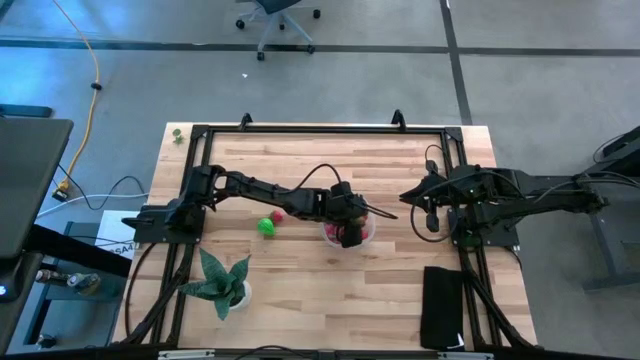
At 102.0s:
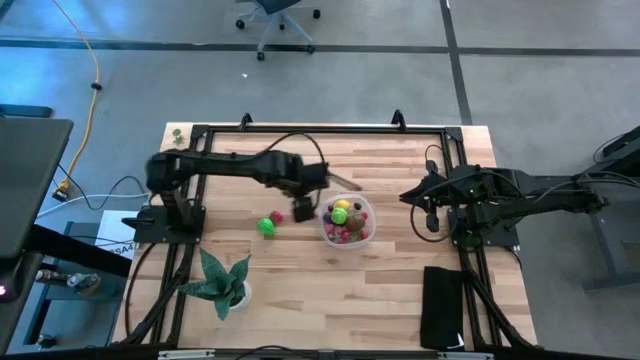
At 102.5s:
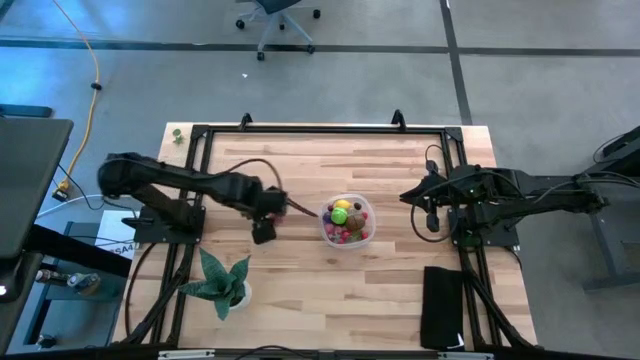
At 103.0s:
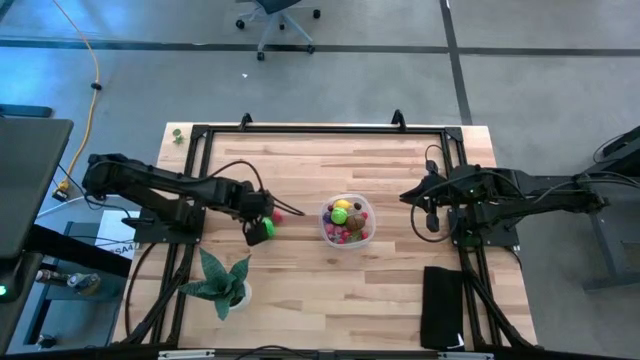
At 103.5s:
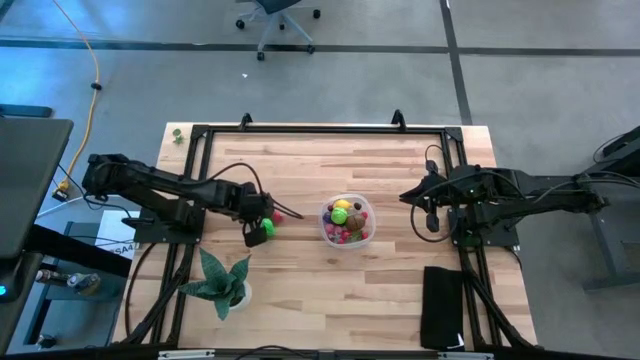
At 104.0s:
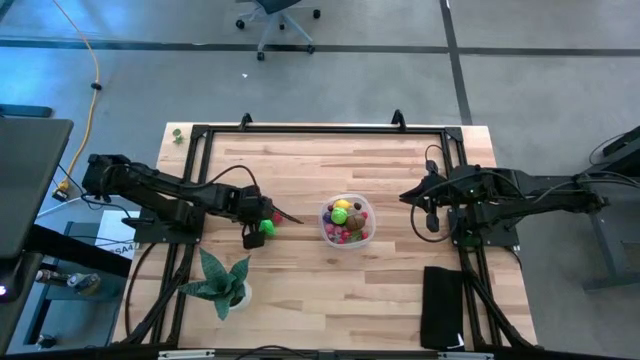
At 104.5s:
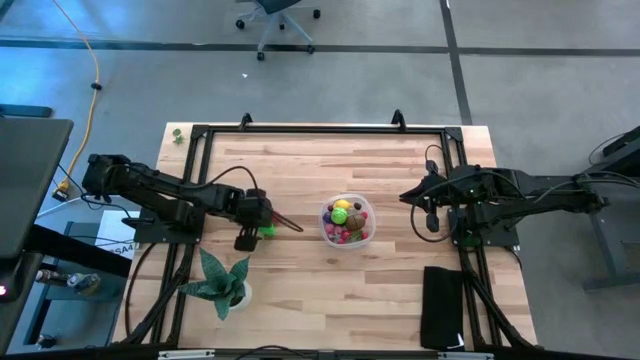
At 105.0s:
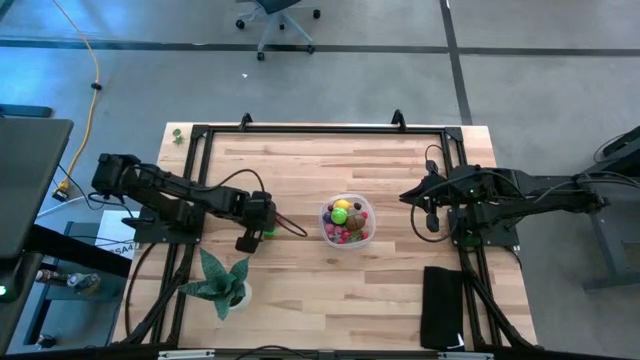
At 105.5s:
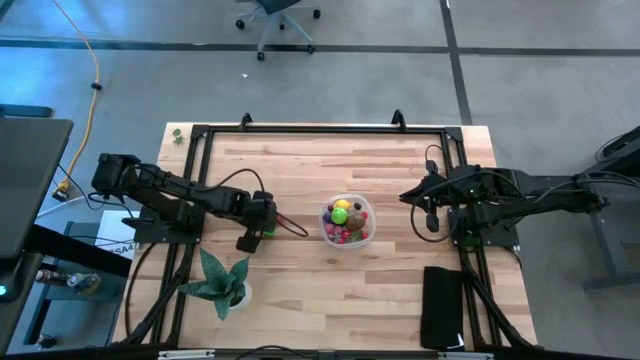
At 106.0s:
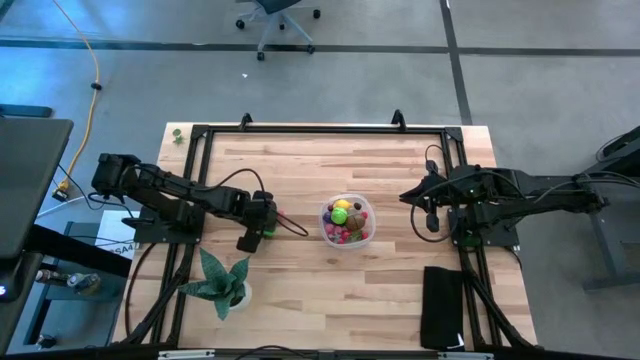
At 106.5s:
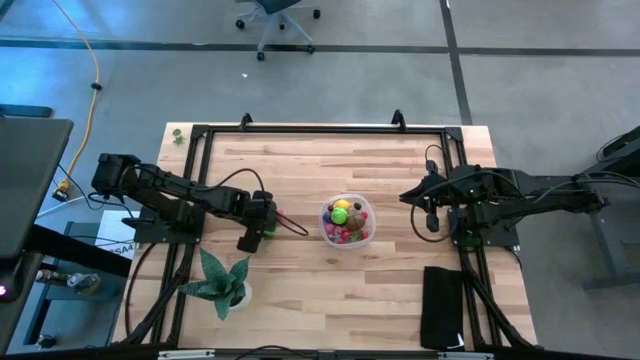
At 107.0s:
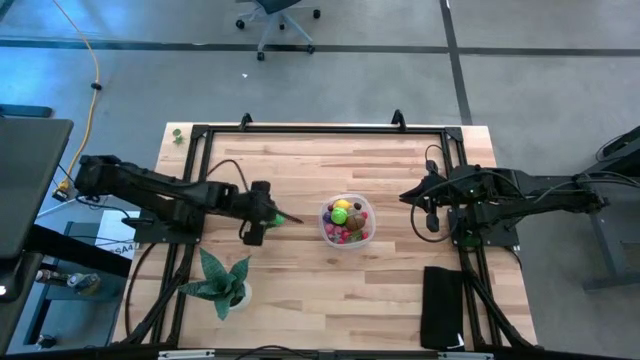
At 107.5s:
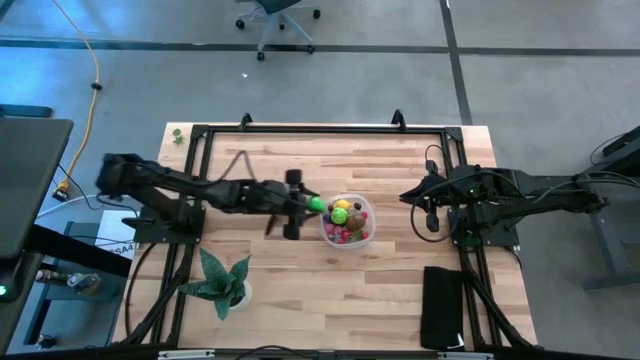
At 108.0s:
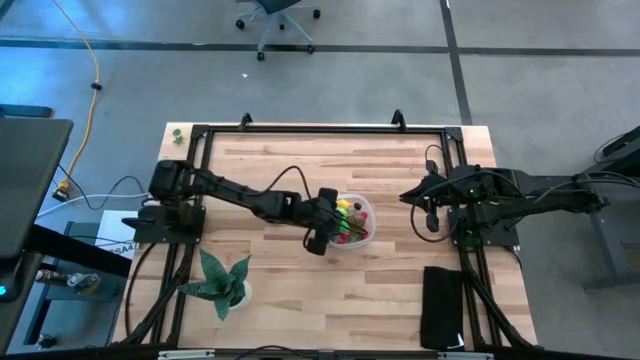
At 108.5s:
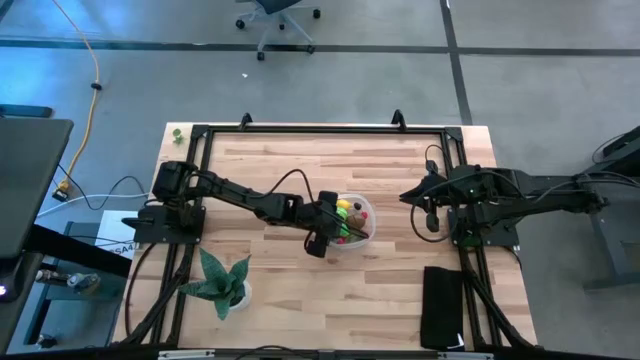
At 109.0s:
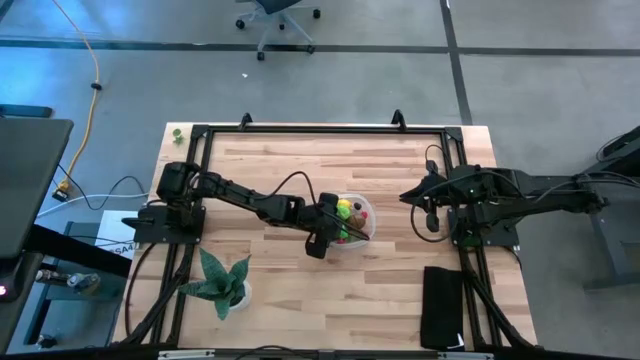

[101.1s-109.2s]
Task: Pick and placing Produce into tupperware
Put the green pear into the transparent container

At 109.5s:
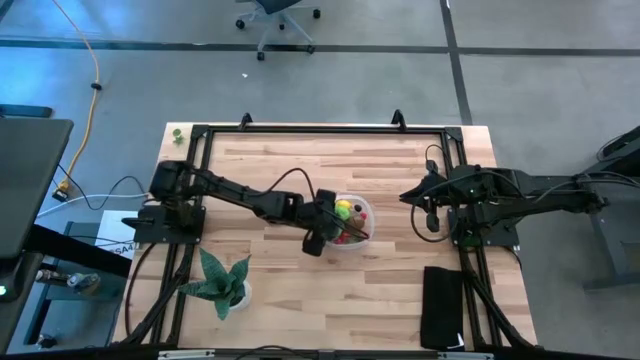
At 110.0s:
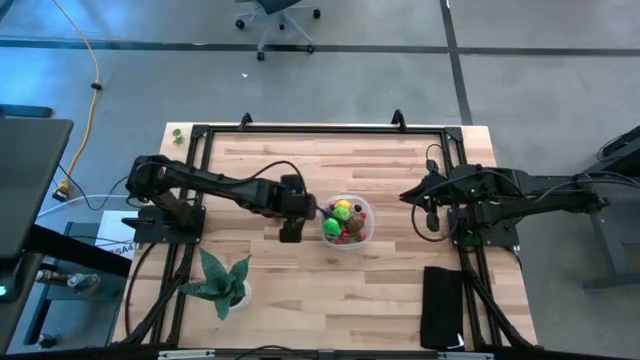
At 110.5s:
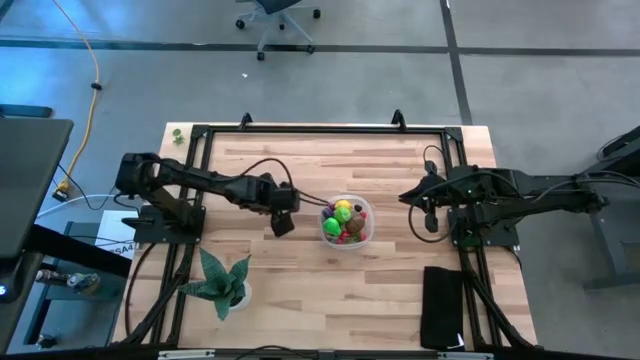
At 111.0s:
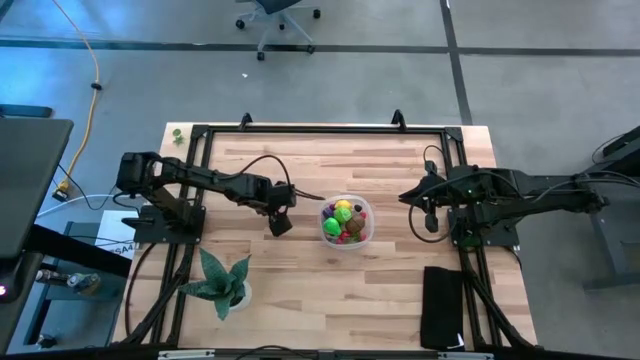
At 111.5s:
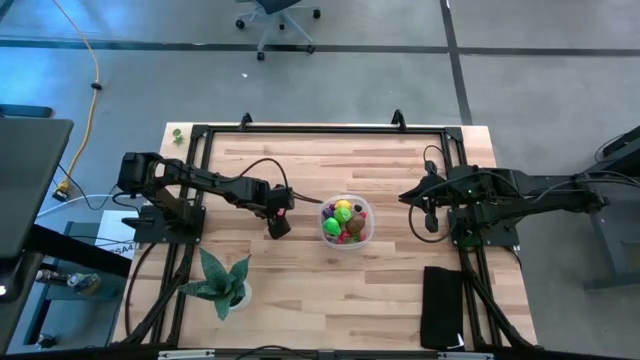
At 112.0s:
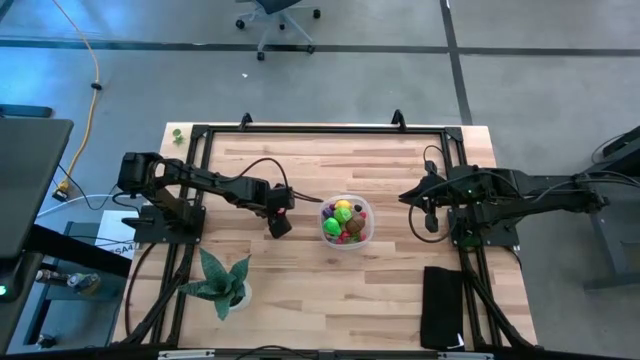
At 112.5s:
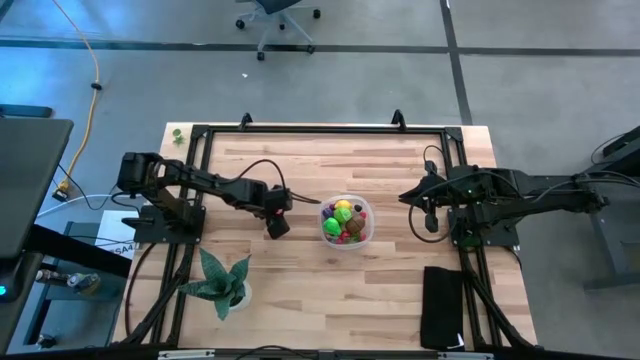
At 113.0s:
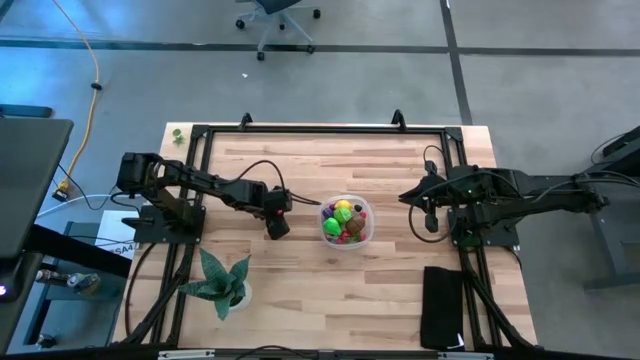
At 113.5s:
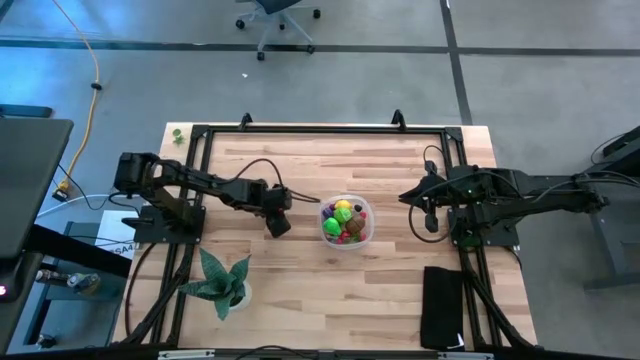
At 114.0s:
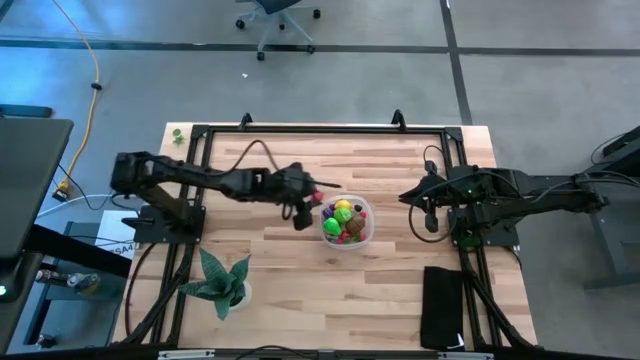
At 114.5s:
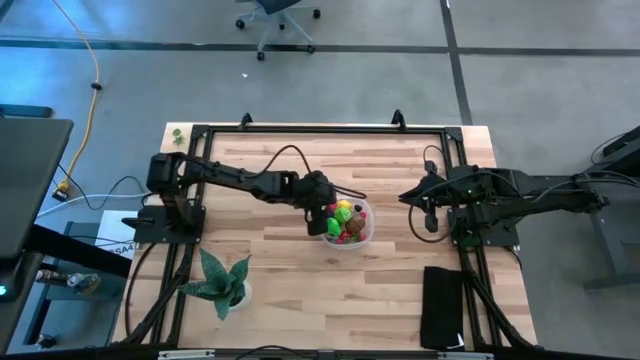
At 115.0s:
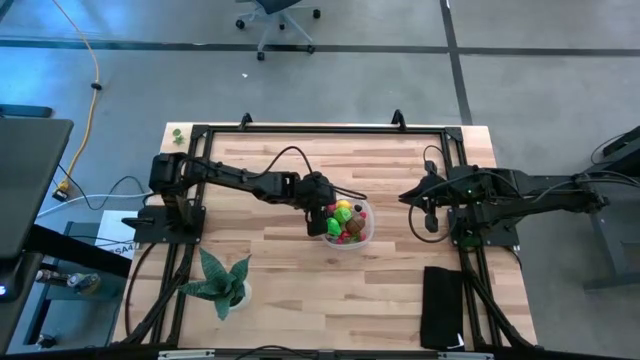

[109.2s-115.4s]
Put the red strawberry into the transparent container

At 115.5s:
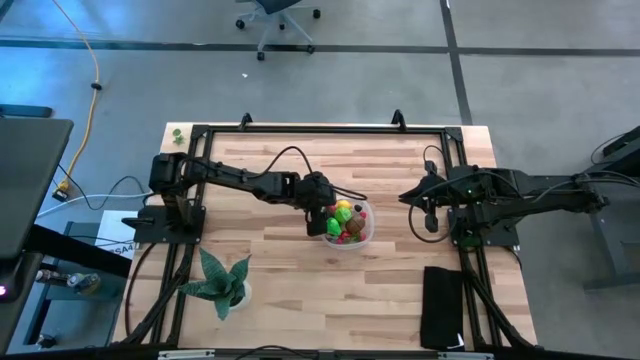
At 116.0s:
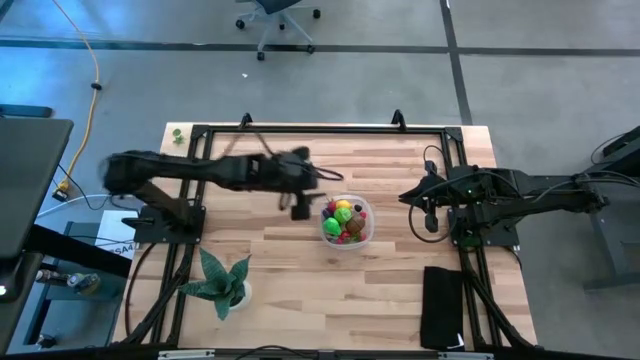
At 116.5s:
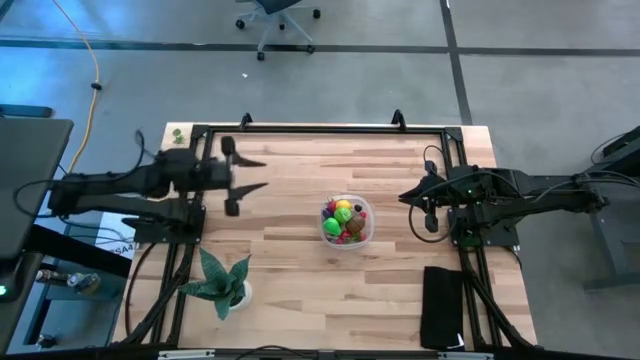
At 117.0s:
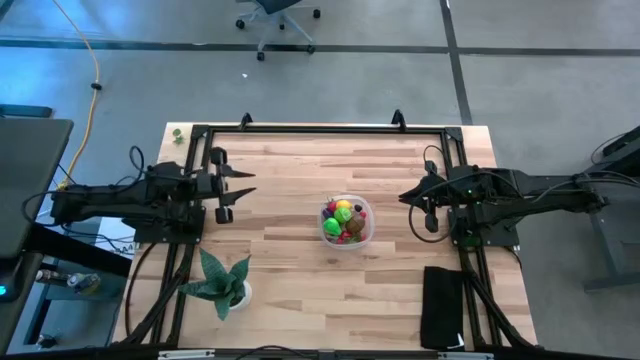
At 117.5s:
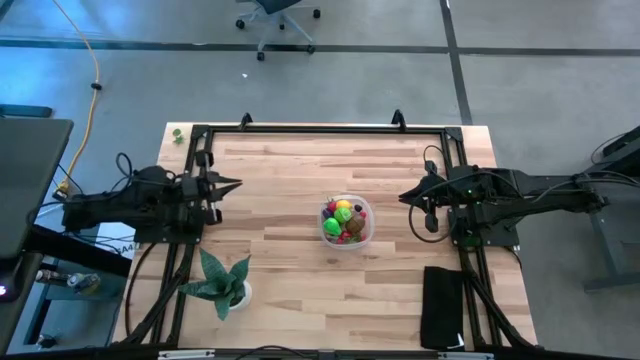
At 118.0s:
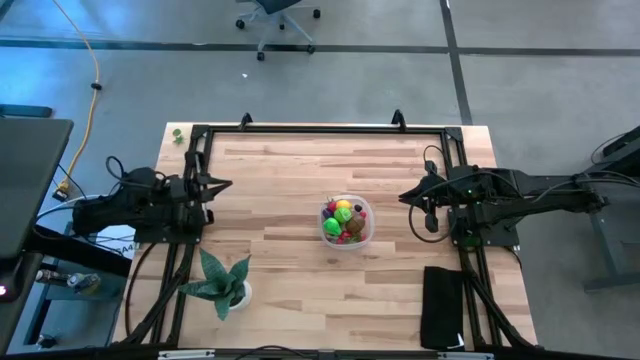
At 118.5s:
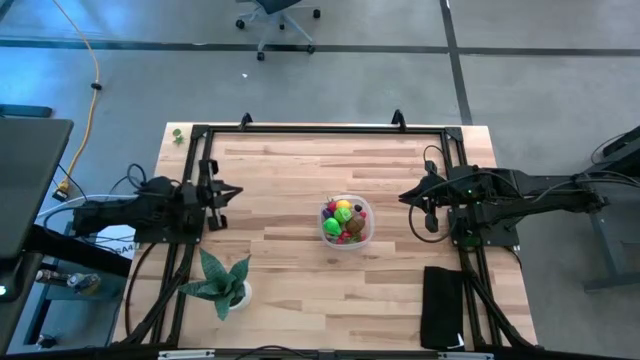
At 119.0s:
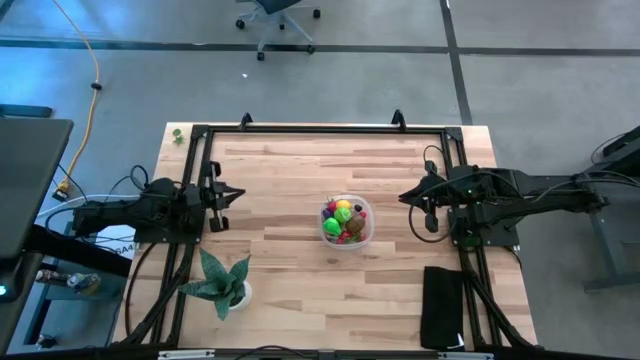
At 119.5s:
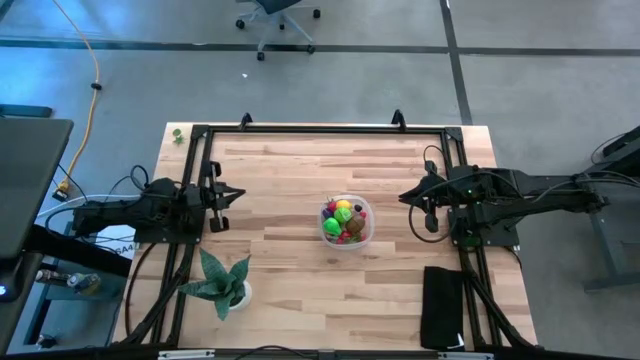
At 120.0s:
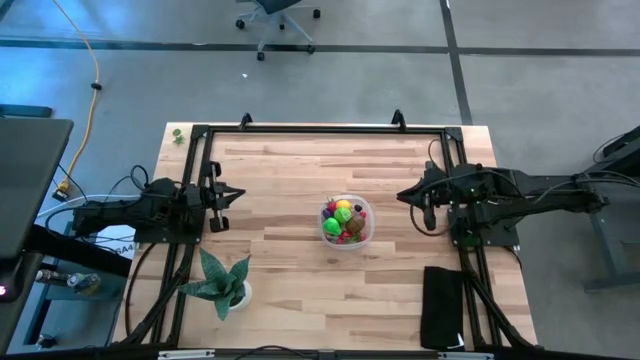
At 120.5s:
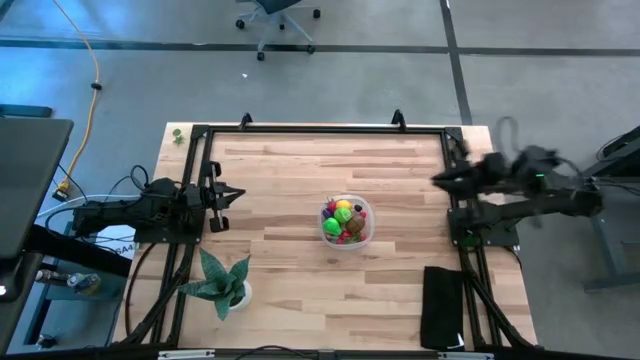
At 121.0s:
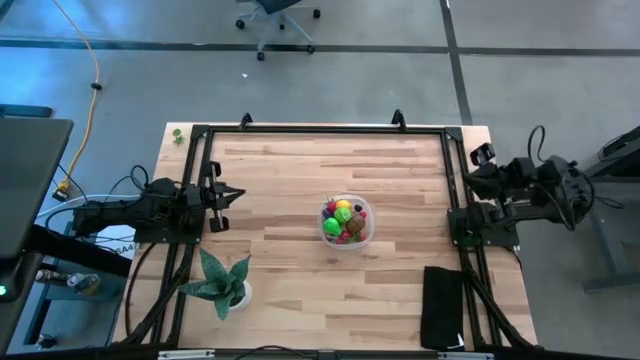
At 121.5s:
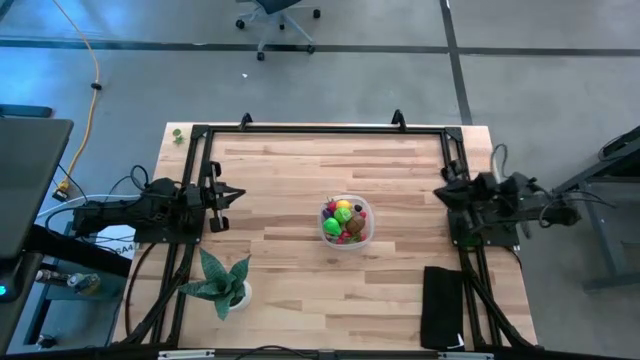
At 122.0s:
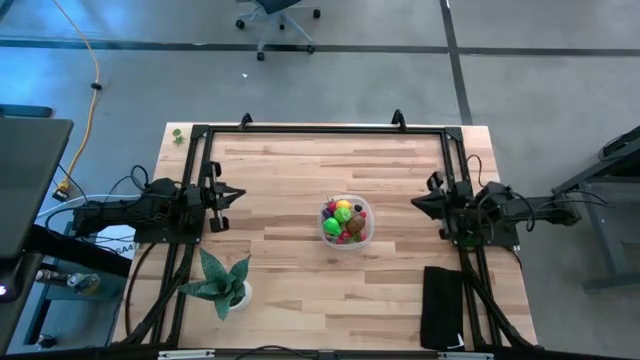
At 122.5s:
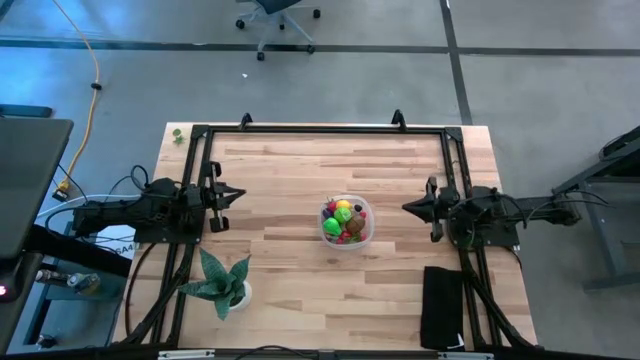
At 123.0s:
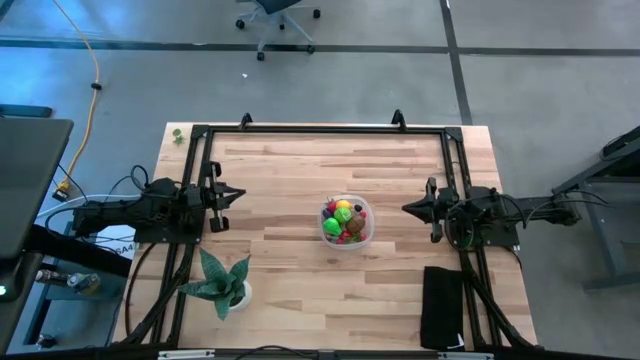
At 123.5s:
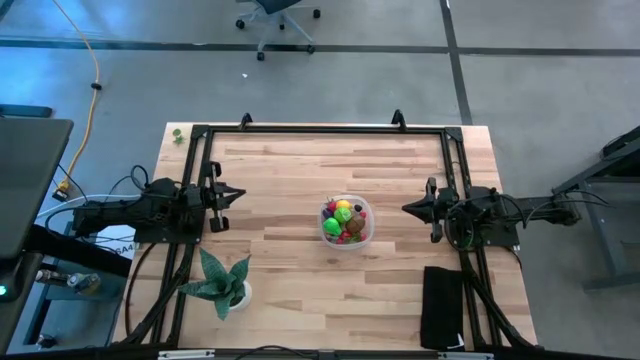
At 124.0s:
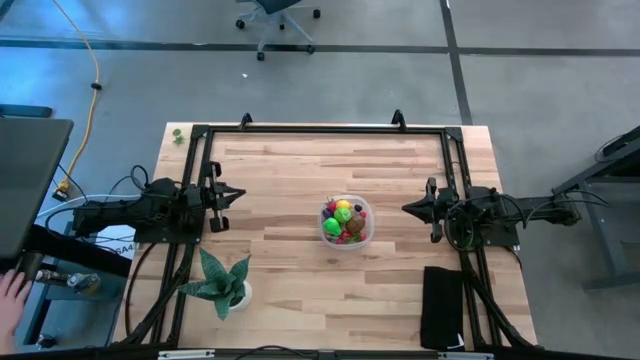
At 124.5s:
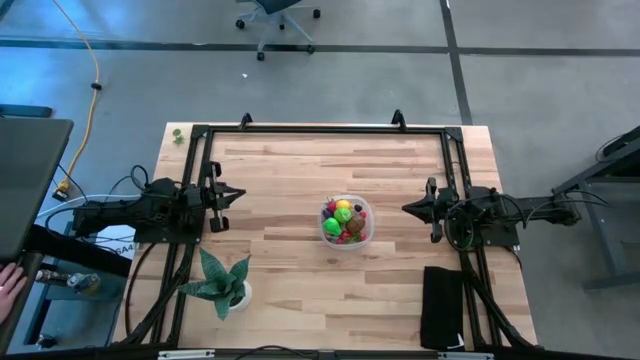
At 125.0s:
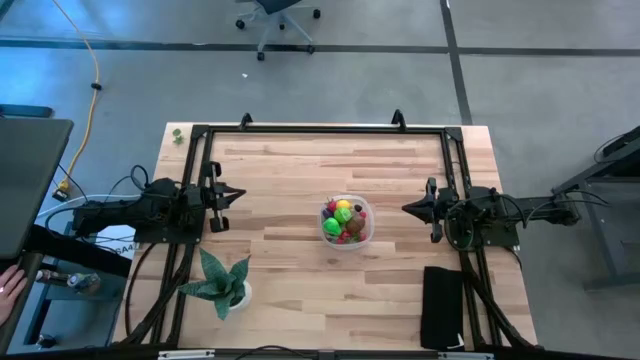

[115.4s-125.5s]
Return to Home Position
